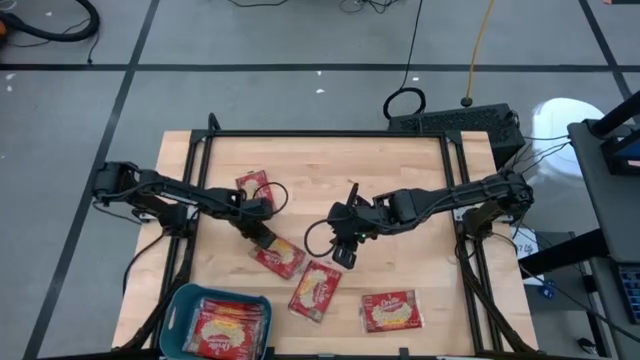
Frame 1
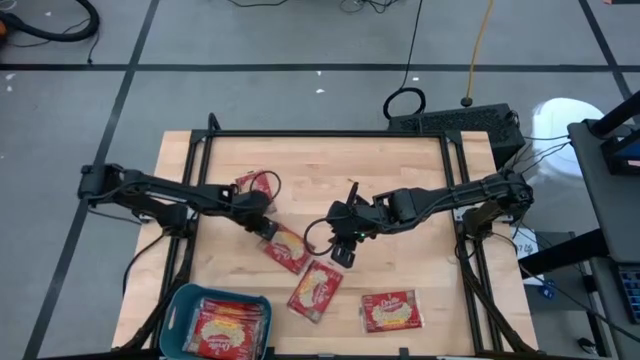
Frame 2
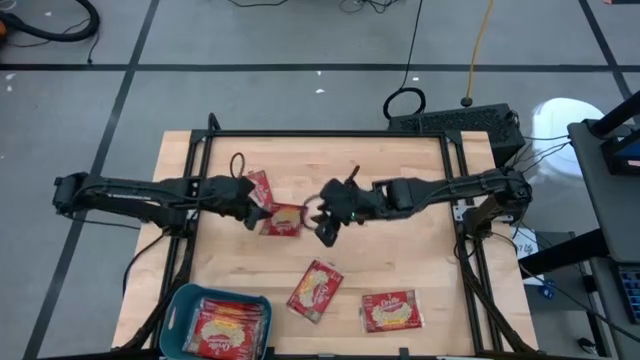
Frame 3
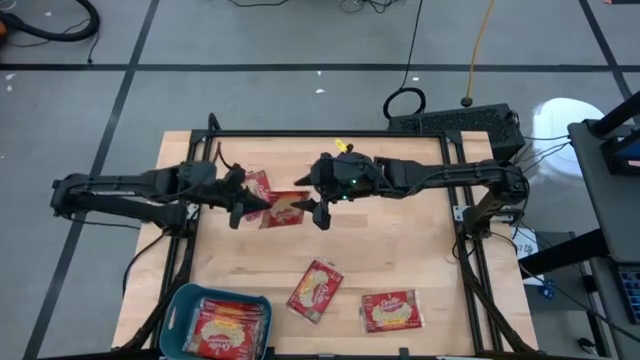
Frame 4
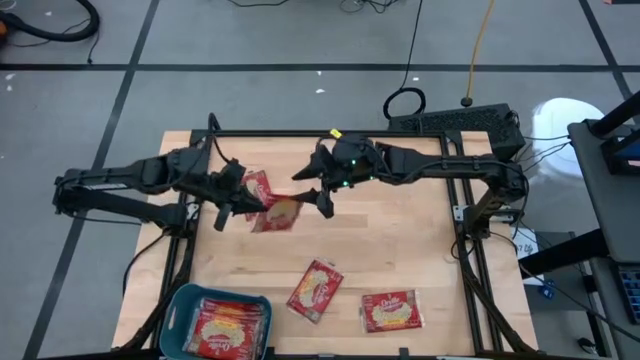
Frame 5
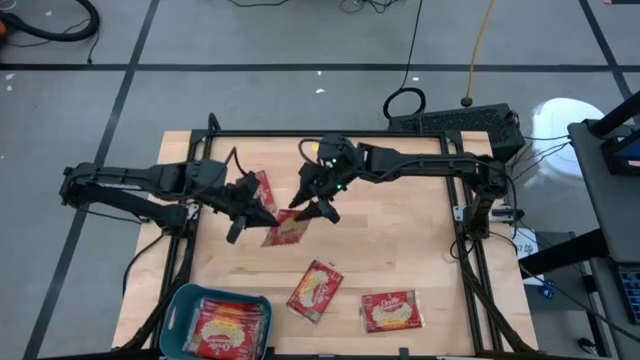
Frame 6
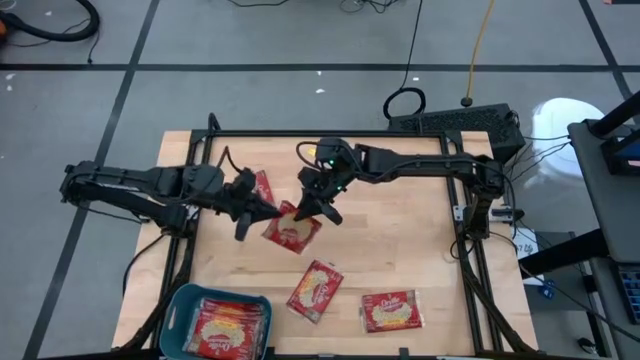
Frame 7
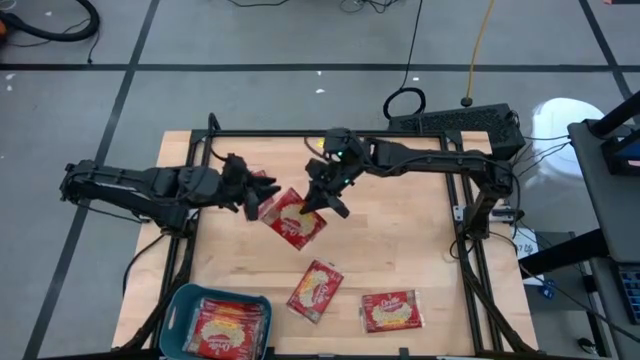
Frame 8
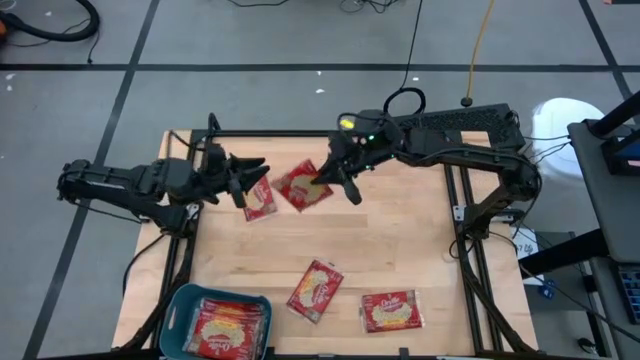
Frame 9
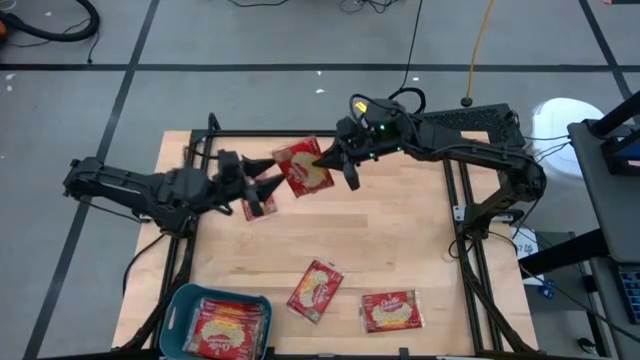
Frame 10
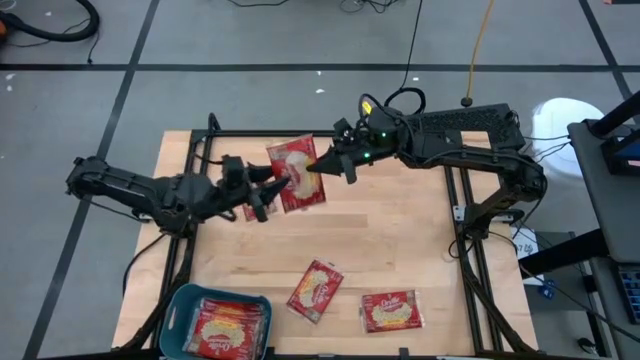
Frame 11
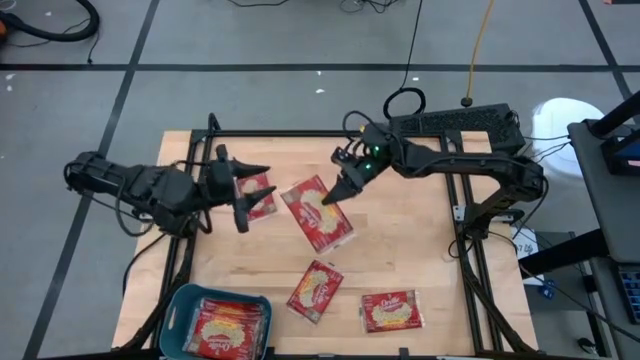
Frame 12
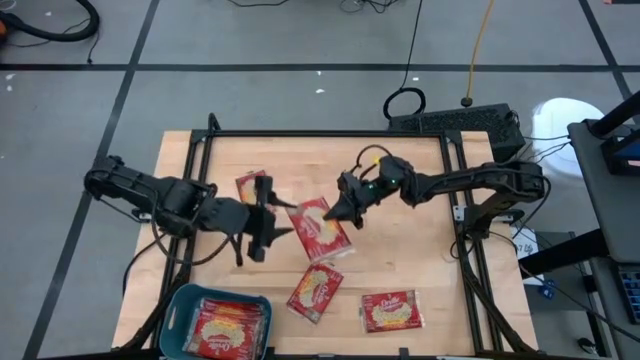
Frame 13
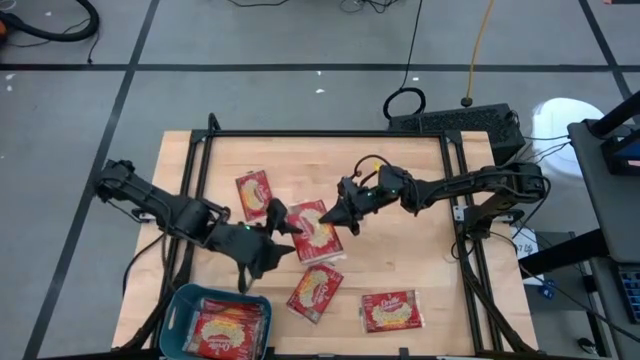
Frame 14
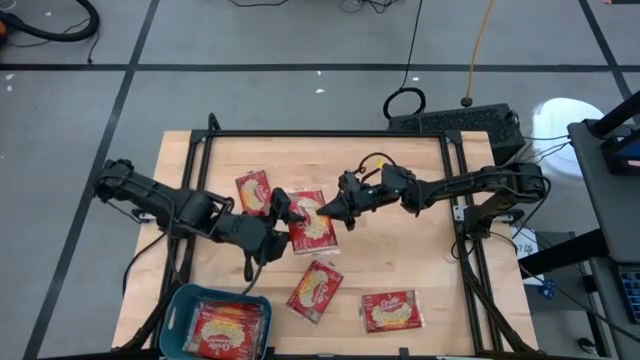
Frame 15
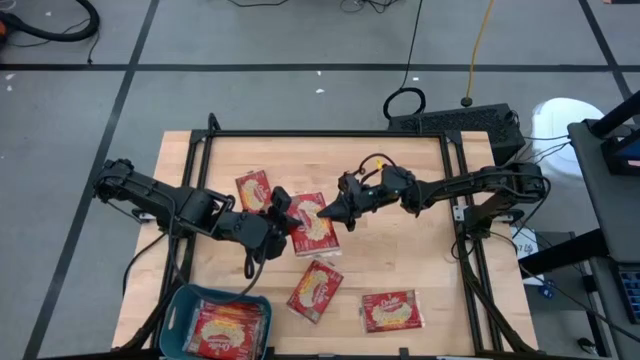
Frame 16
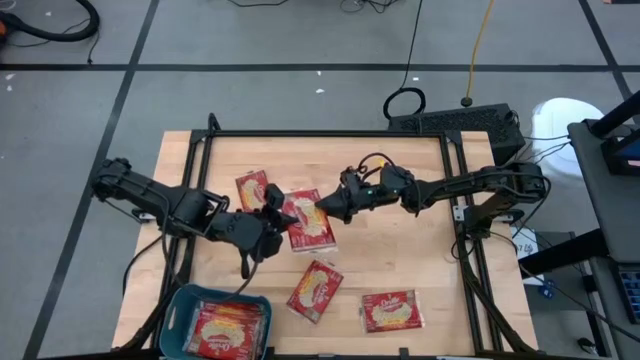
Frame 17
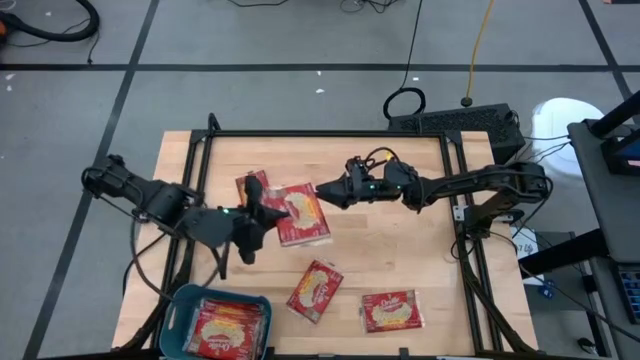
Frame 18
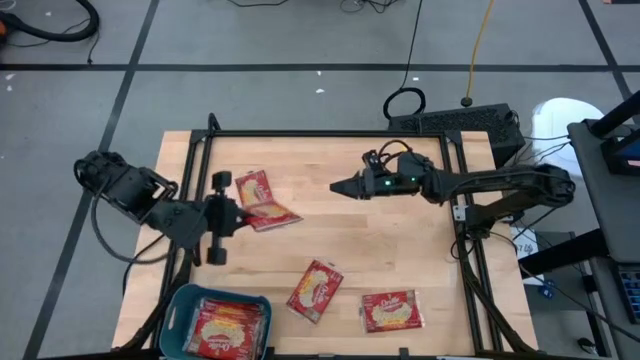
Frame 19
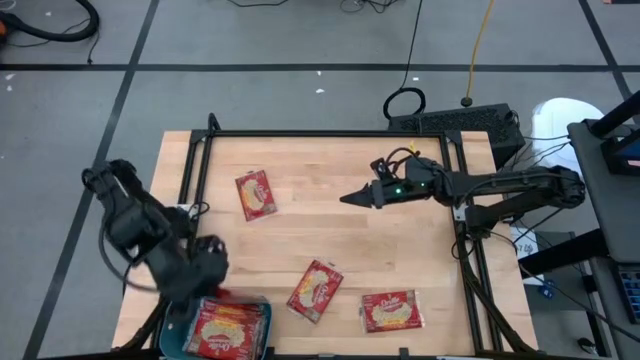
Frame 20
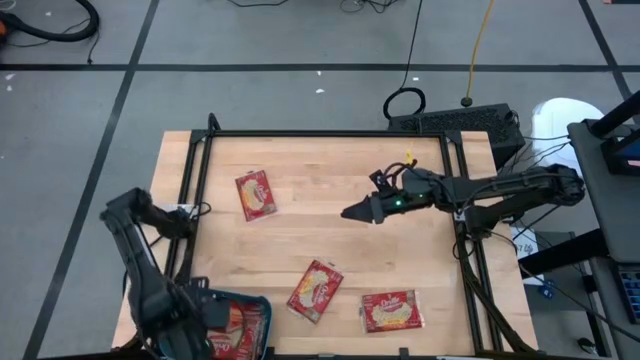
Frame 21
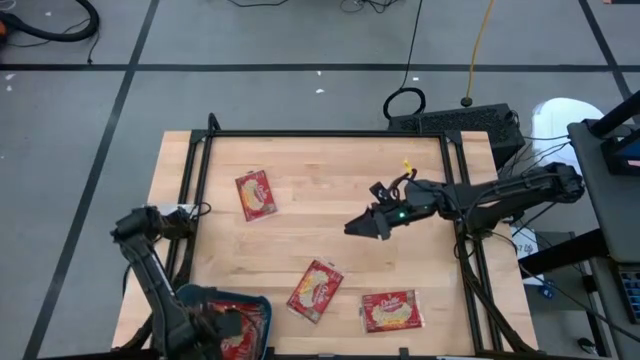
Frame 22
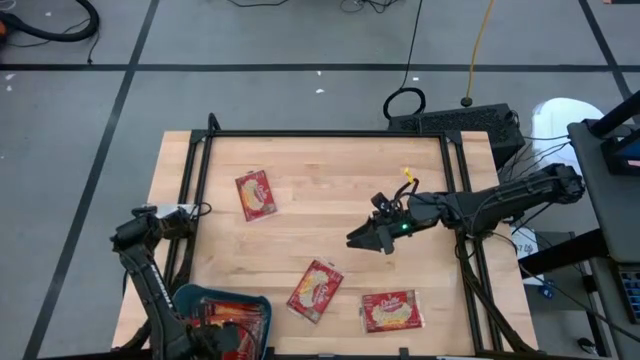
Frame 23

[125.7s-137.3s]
Task: Sort popcorn bags into baskets
Put the popcorn sachet into the bin

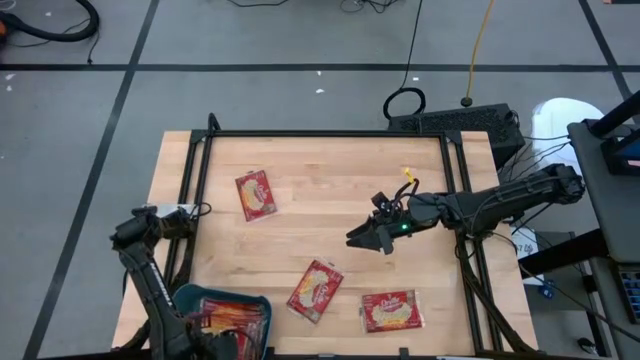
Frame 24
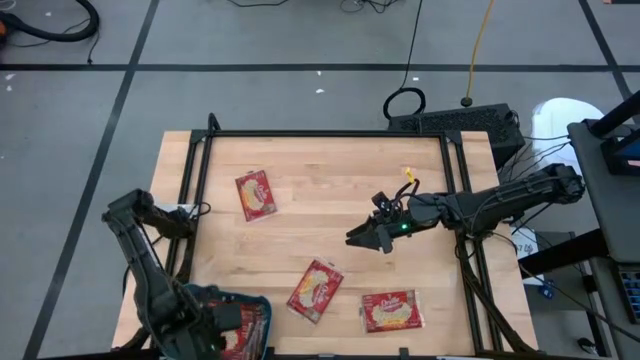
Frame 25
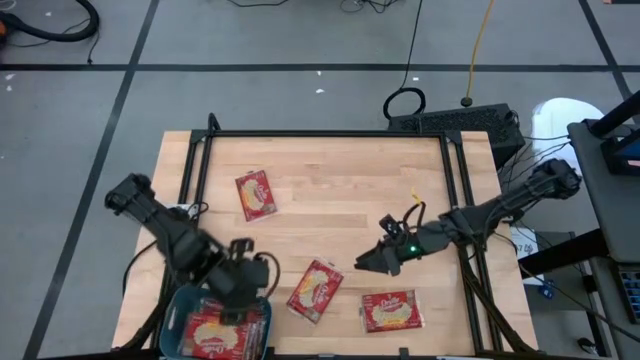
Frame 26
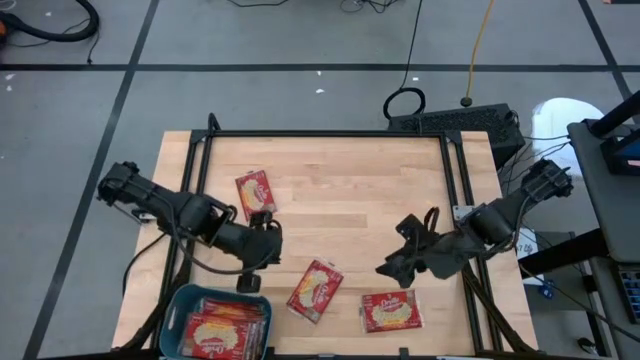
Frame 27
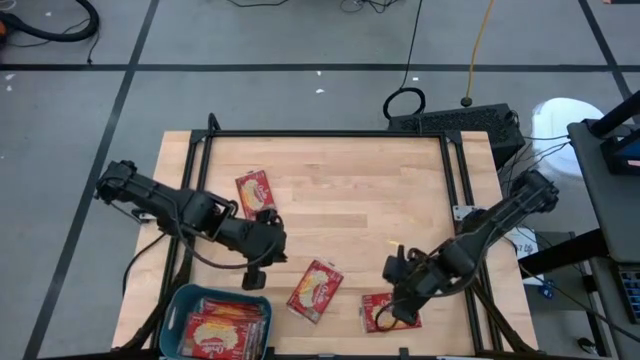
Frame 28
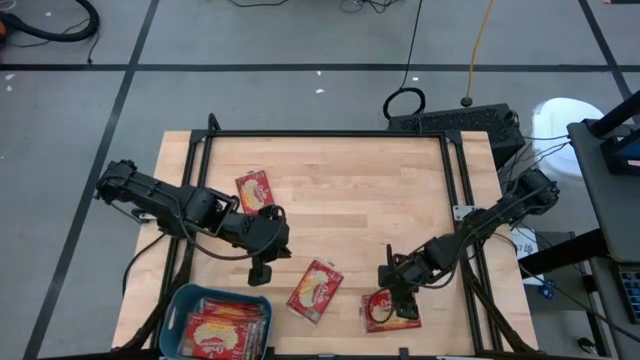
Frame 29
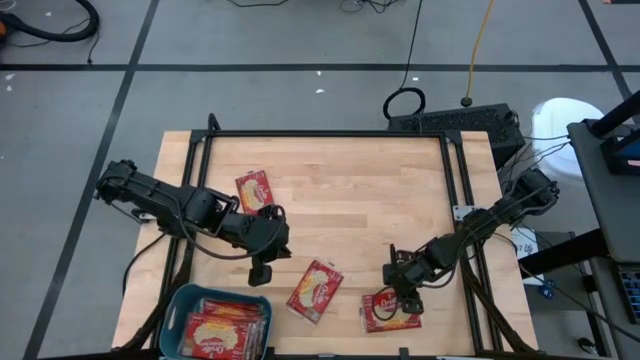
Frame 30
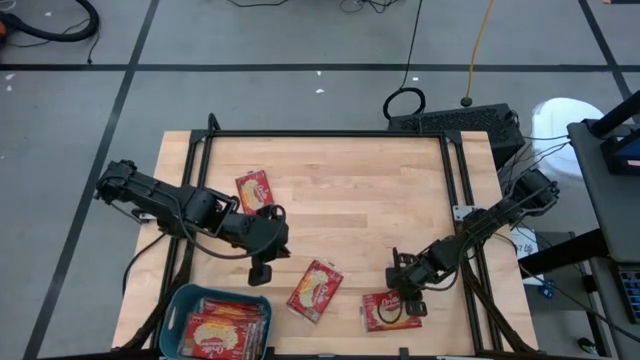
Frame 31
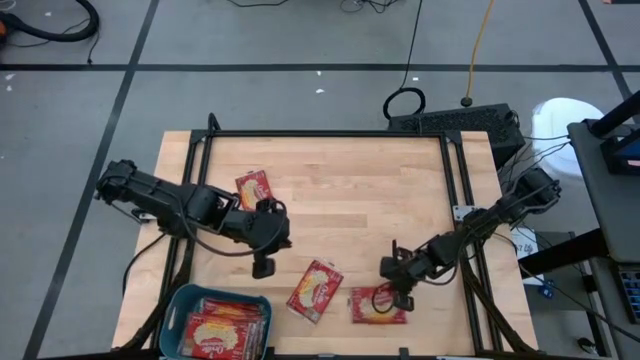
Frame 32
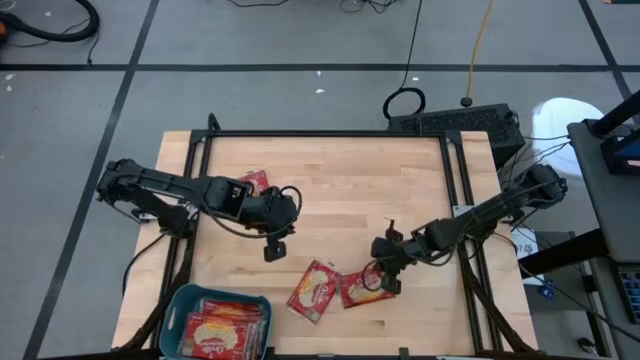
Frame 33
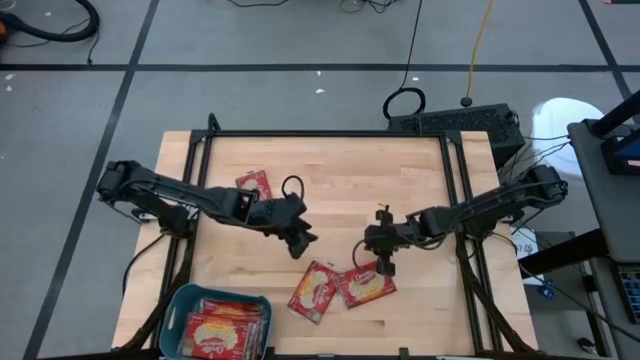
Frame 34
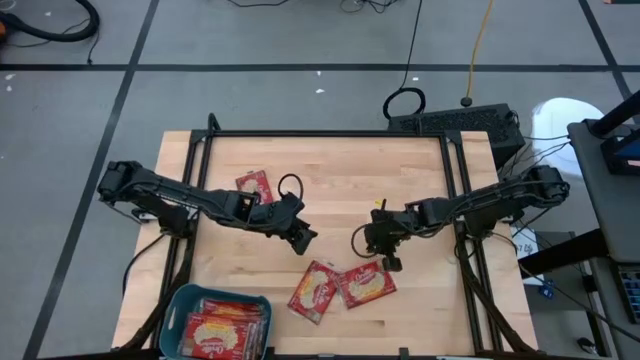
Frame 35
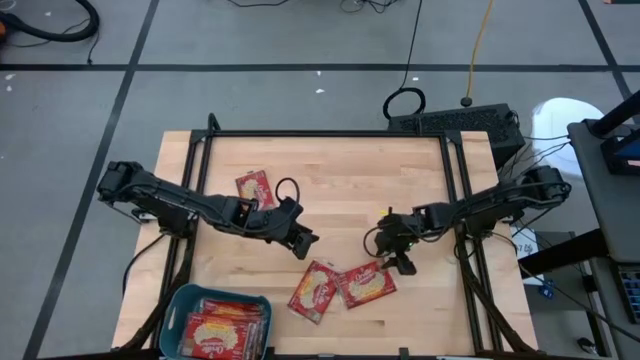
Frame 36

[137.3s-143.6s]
Put the popcorn sachet into the bin
